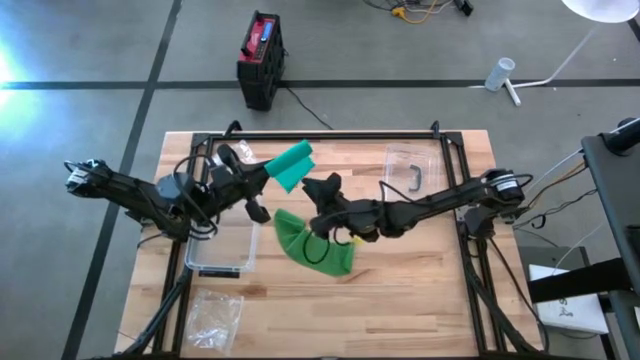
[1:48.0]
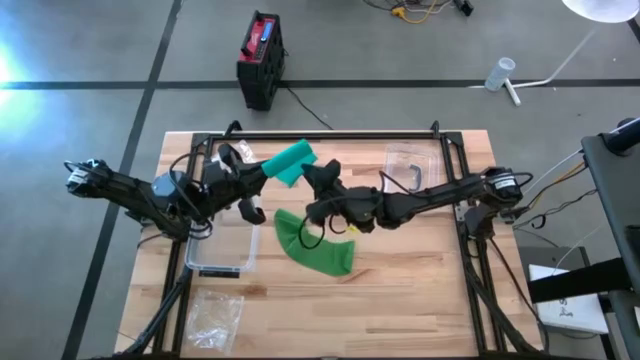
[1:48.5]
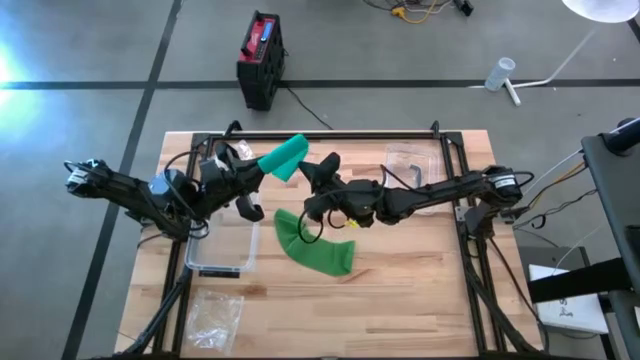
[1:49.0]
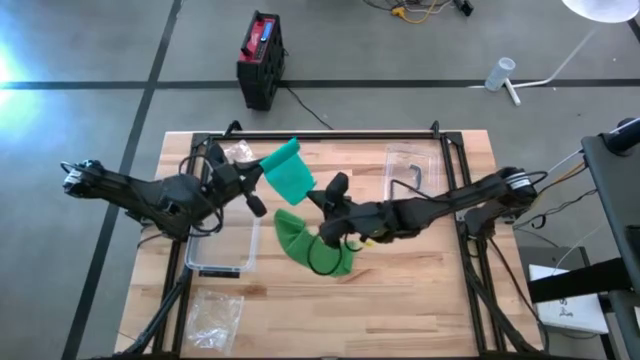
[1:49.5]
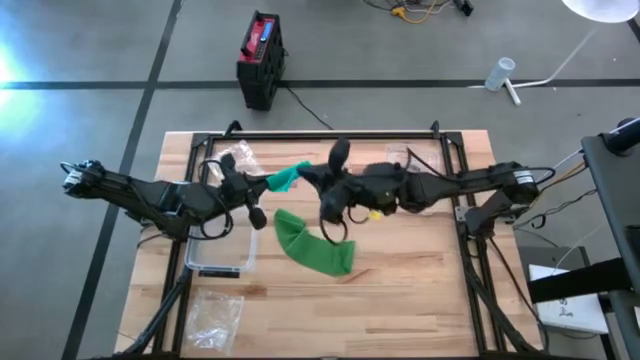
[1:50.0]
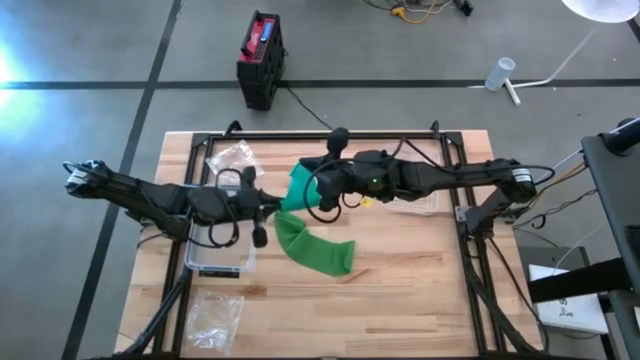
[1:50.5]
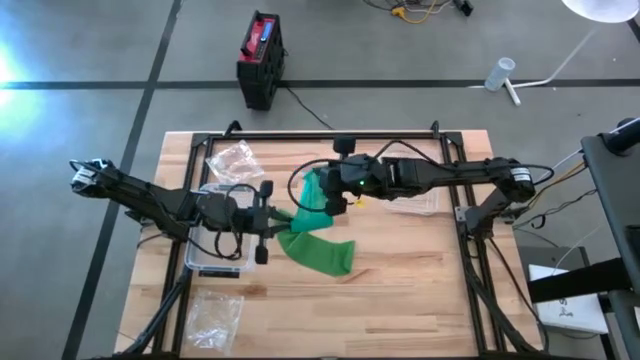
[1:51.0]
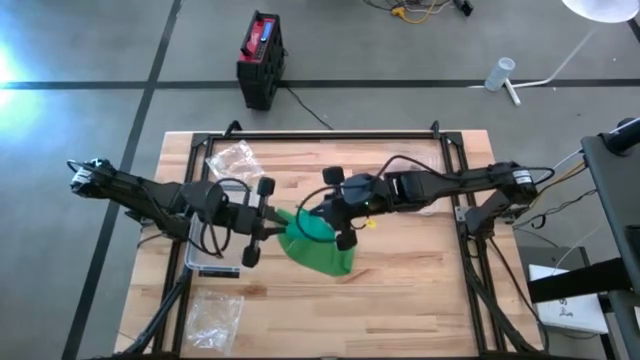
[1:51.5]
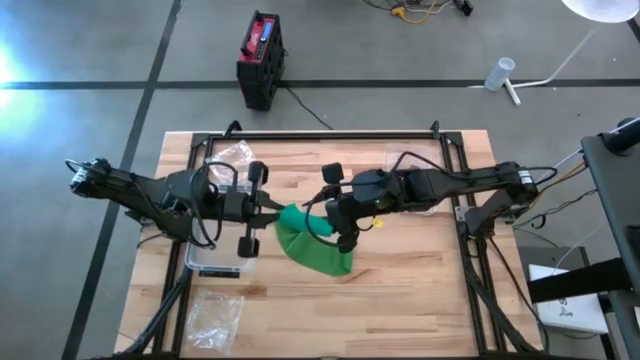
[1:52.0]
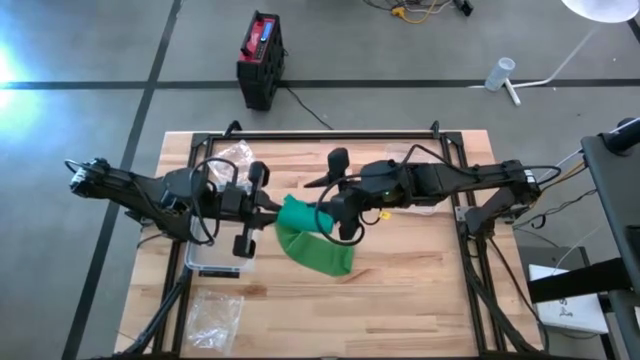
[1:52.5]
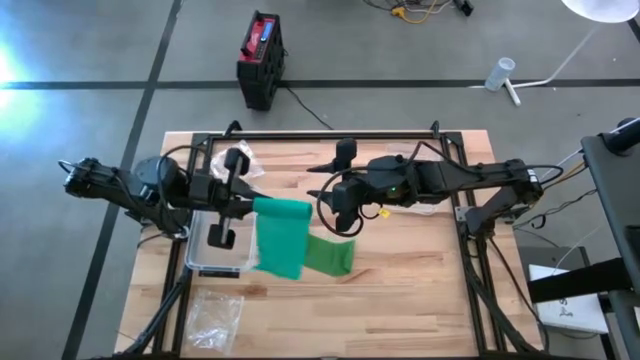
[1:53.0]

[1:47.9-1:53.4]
Task: Roll bandage
Roll the light green bandage

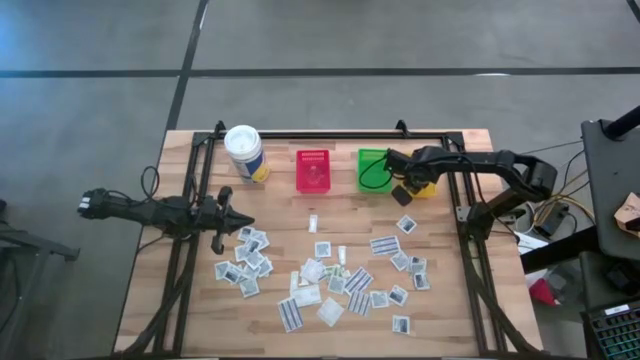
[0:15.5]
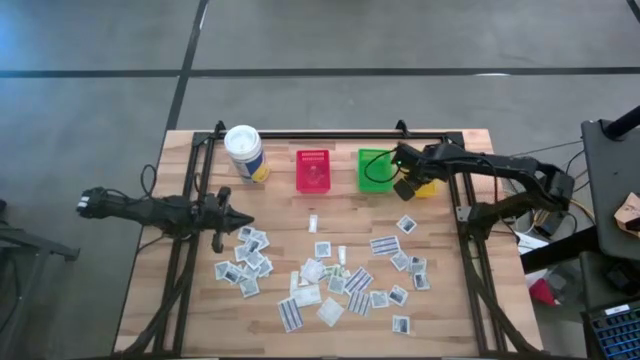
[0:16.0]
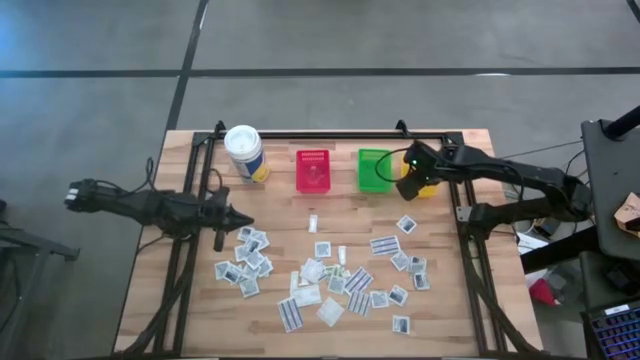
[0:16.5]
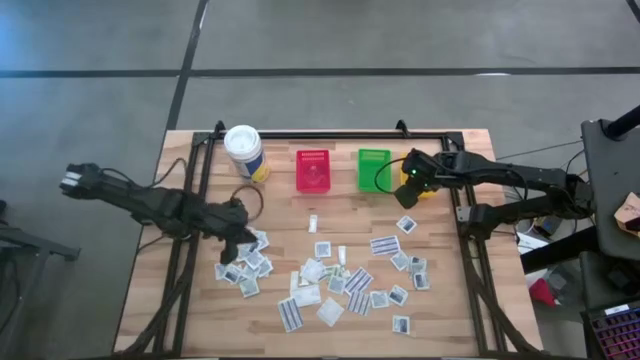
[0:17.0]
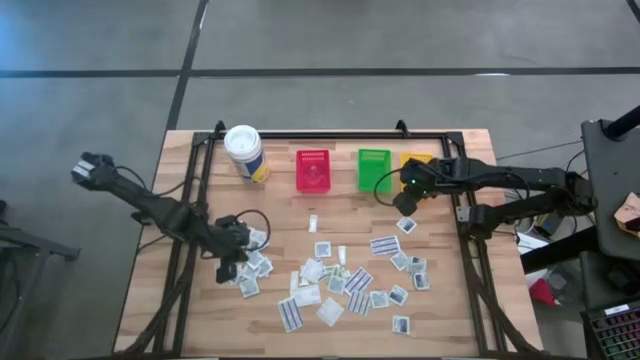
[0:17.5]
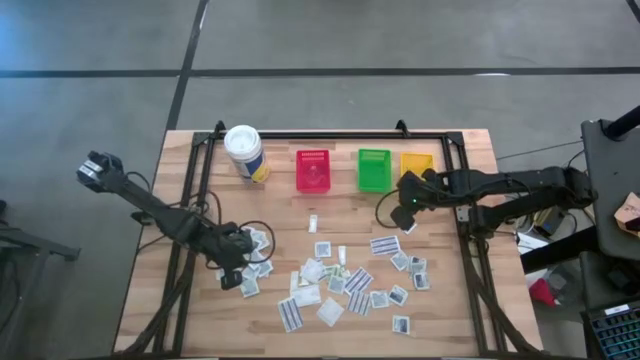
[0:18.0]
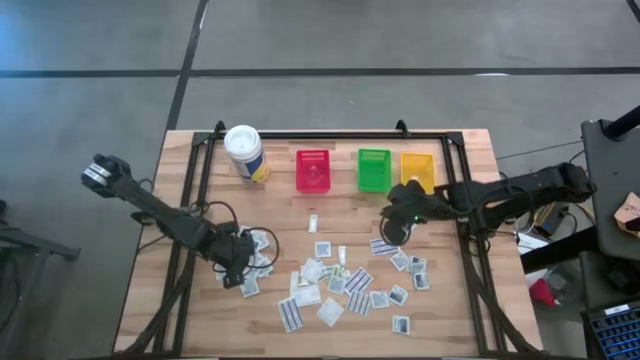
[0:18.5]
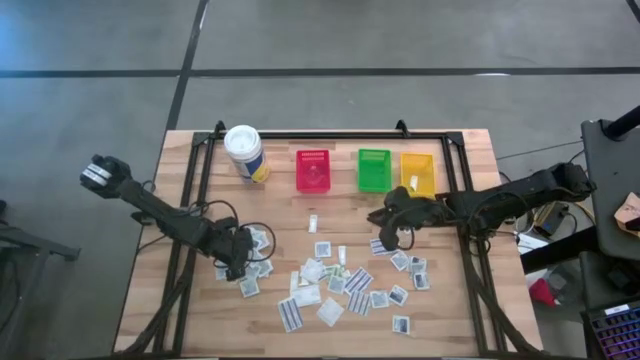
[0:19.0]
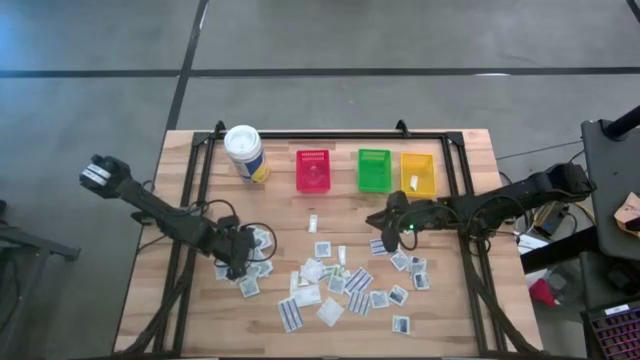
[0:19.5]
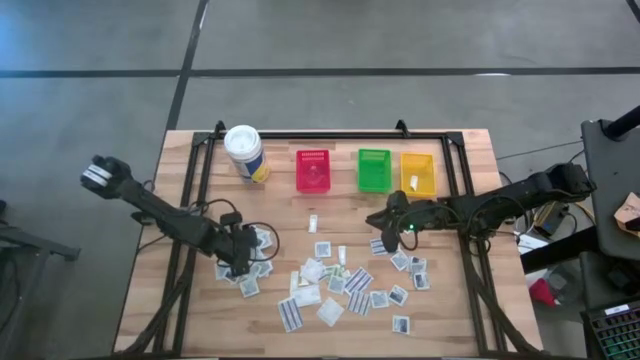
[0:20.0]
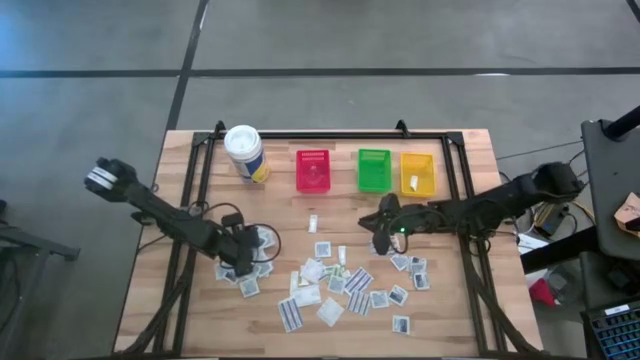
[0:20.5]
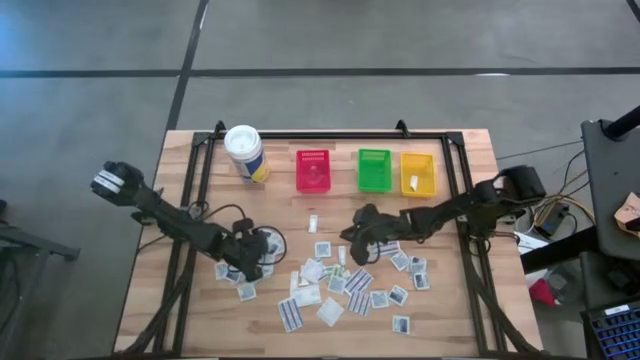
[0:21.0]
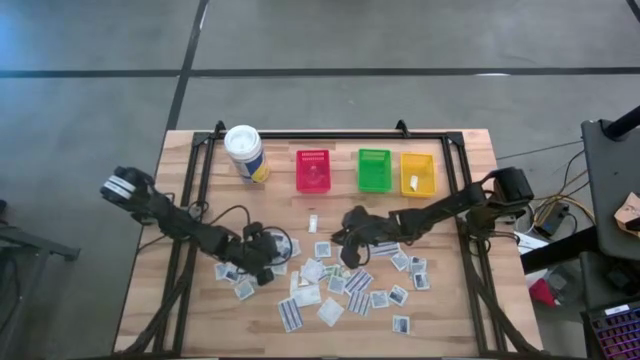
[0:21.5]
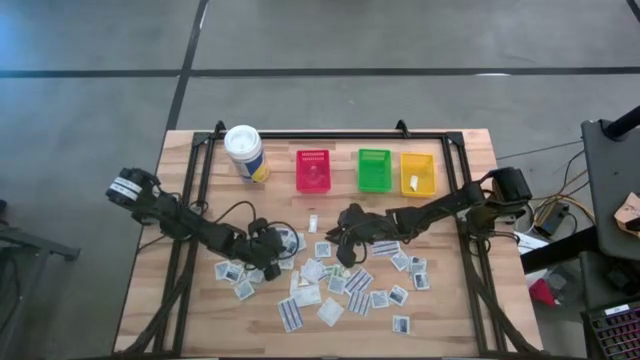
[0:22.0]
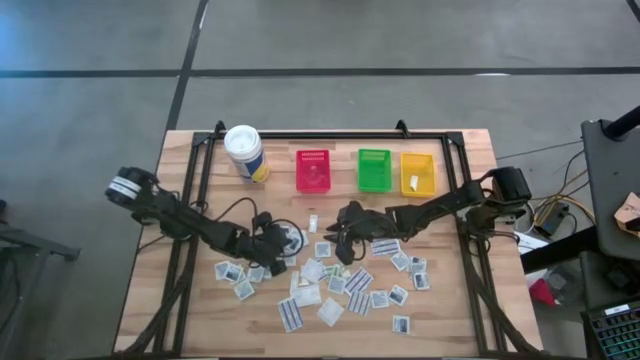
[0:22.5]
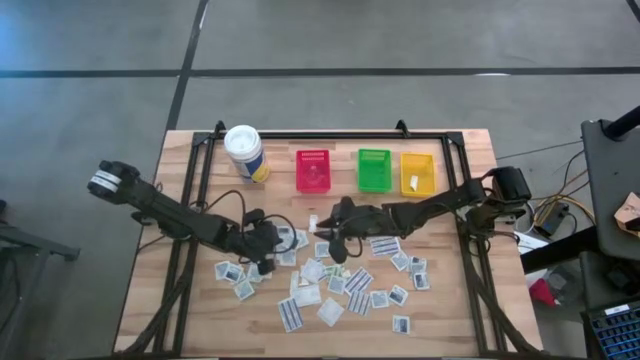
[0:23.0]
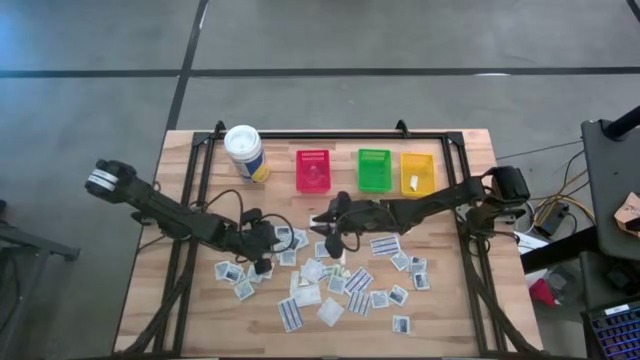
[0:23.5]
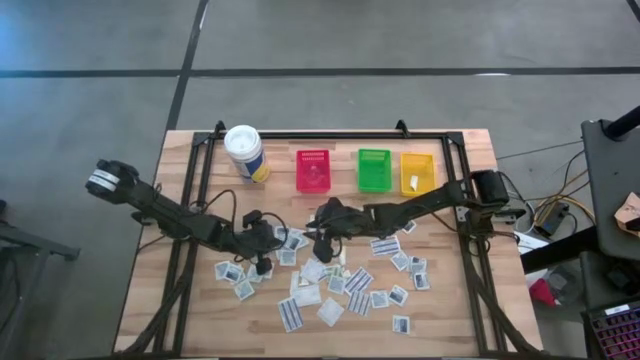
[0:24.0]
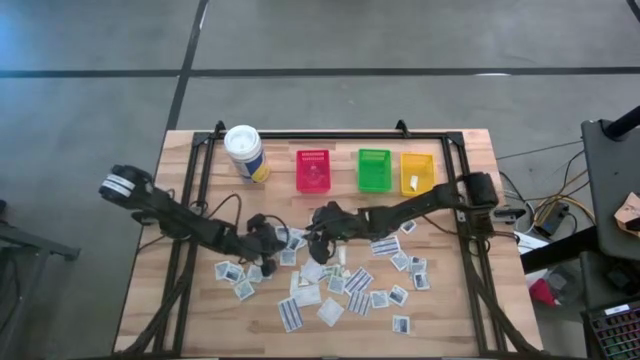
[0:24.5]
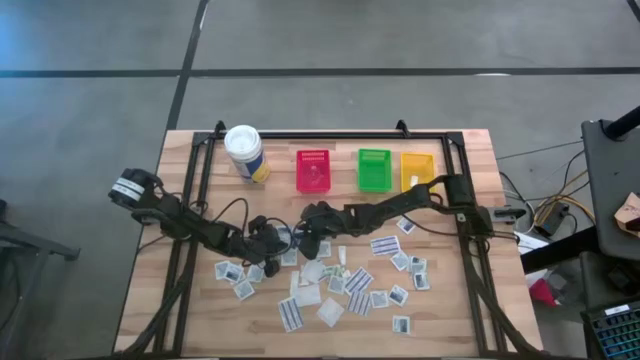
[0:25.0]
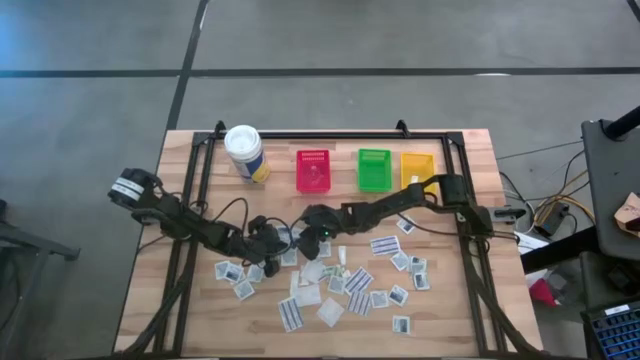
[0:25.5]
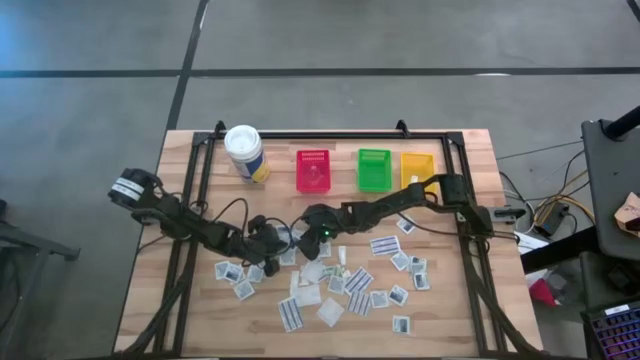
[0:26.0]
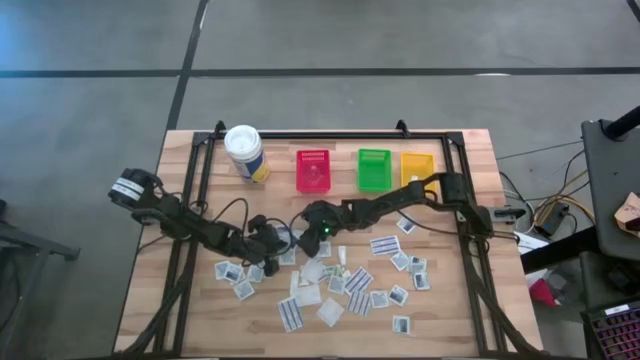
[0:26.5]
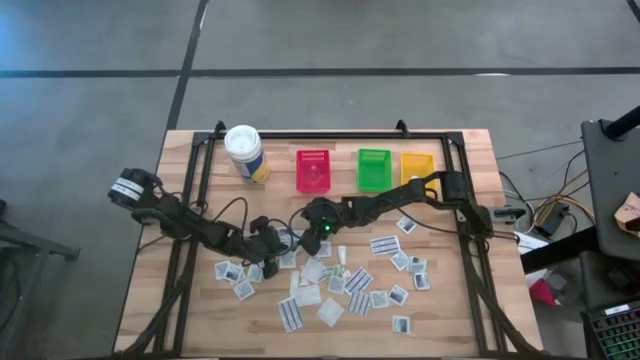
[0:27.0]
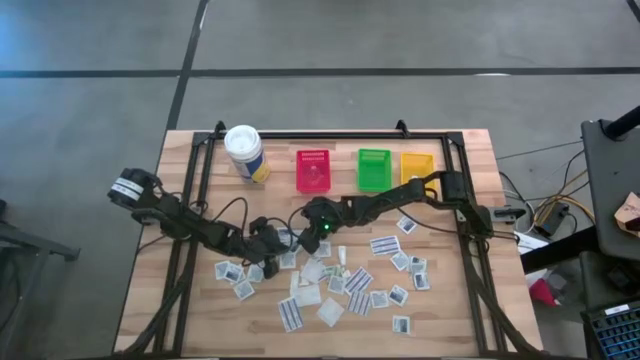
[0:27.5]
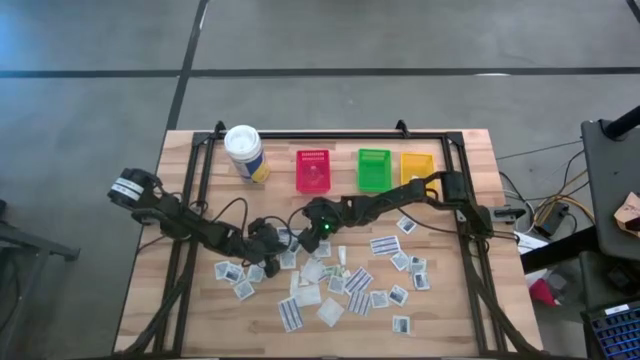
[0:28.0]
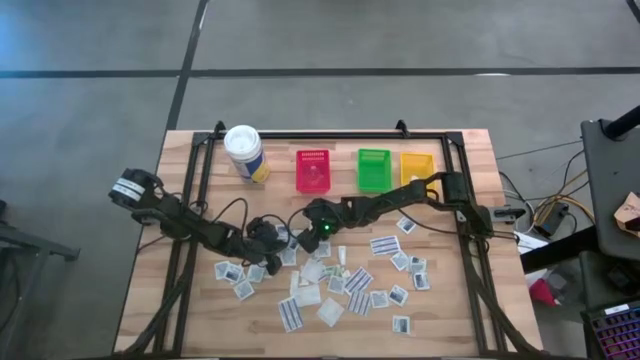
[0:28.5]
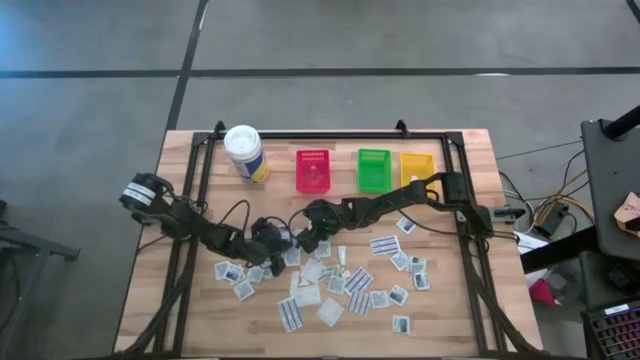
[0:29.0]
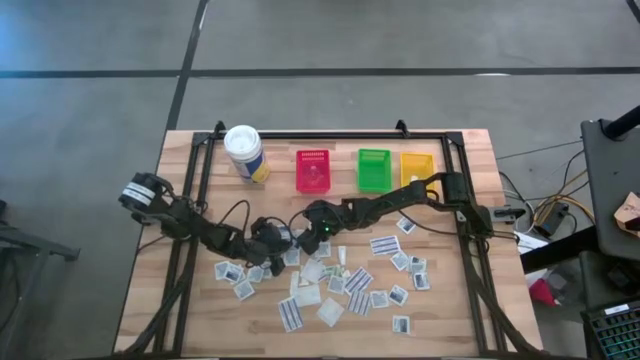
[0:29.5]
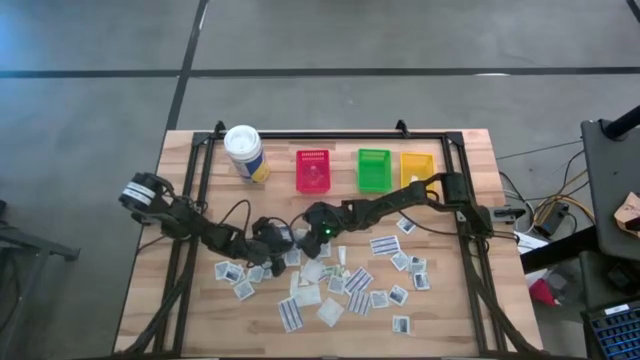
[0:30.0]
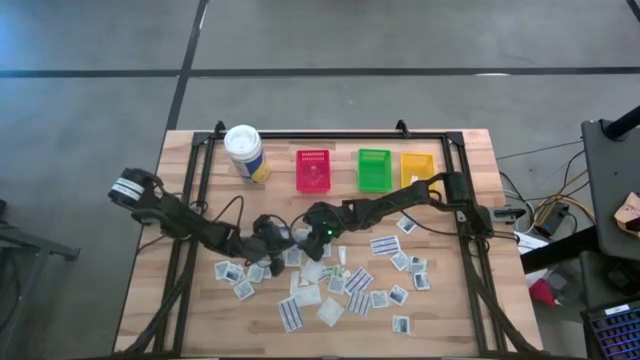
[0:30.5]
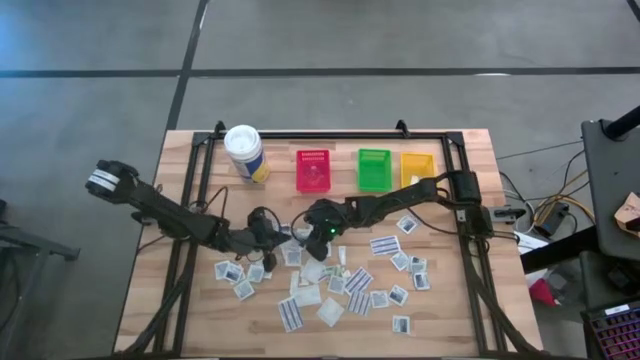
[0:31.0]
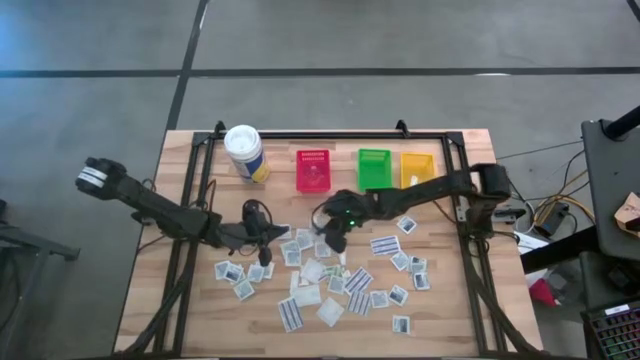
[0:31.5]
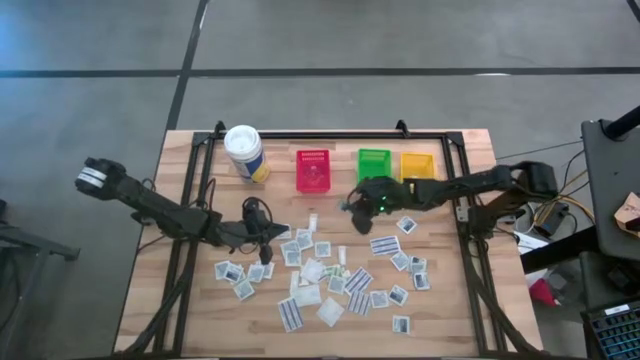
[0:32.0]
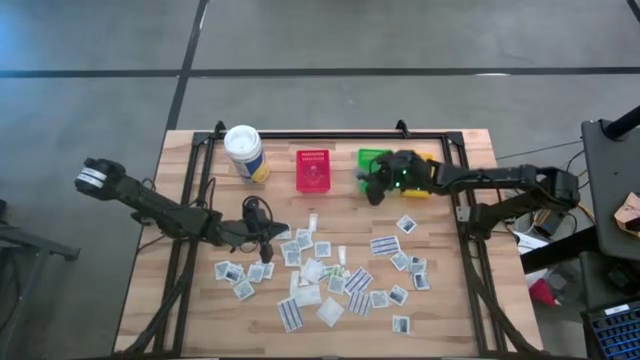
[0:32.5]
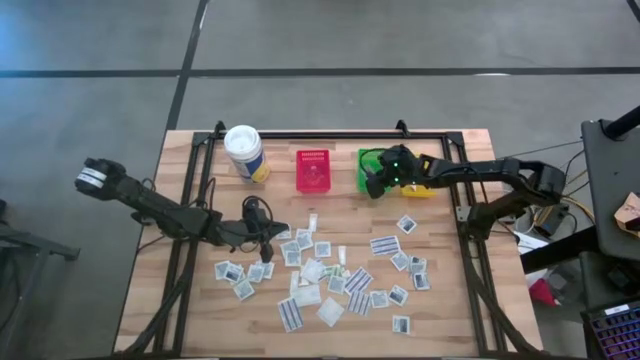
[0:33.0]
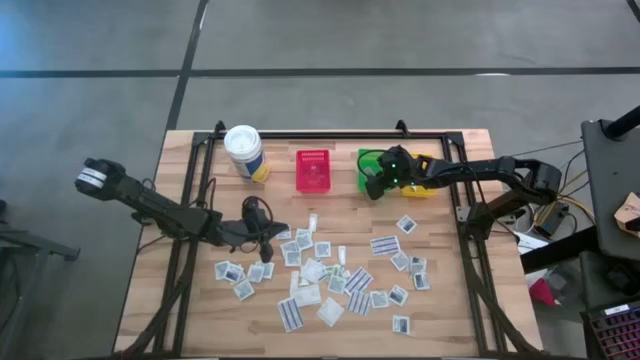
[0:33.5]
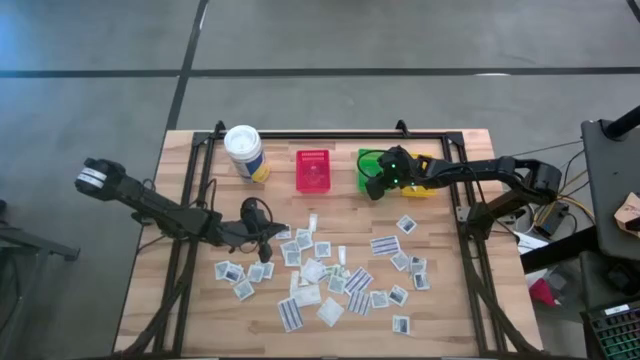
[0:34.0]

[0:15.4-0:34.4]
Task: Pick & Place First Aid Supplies
Put the alcohol pad in the green bin
